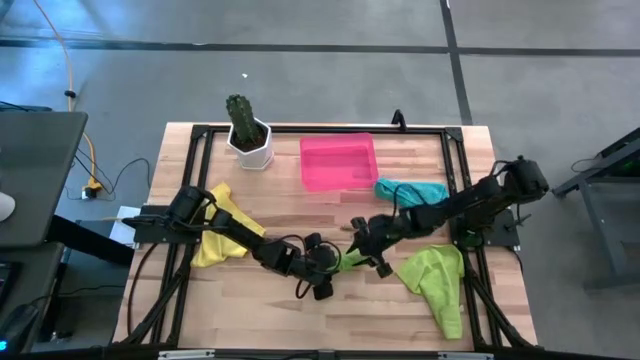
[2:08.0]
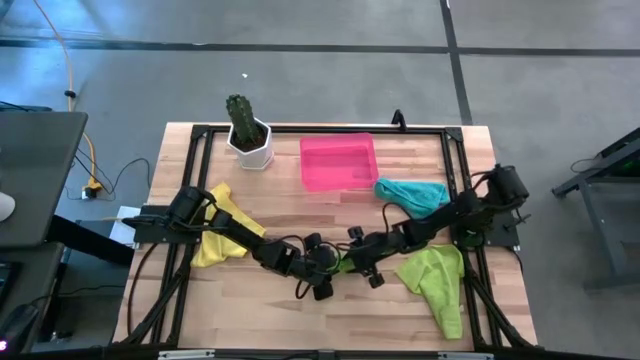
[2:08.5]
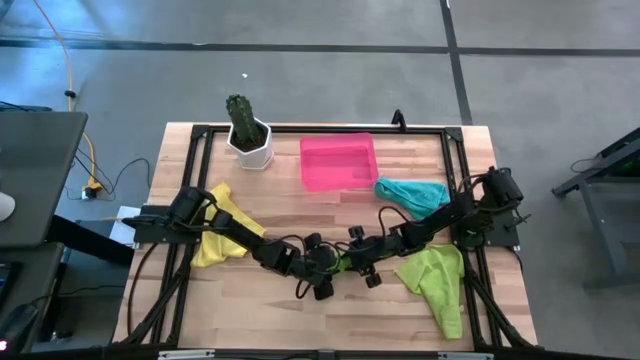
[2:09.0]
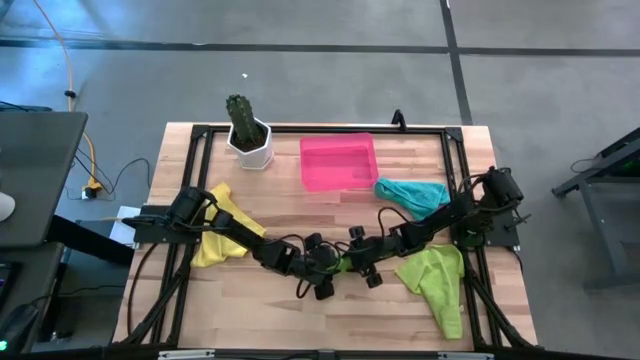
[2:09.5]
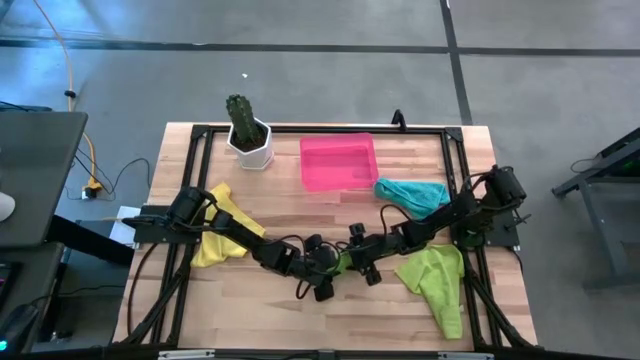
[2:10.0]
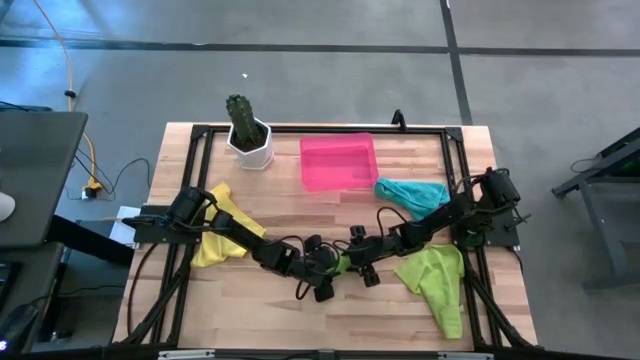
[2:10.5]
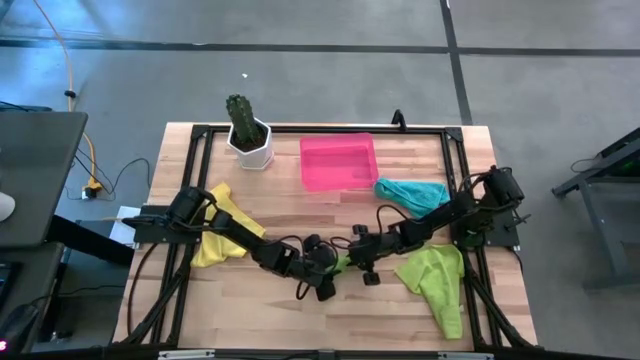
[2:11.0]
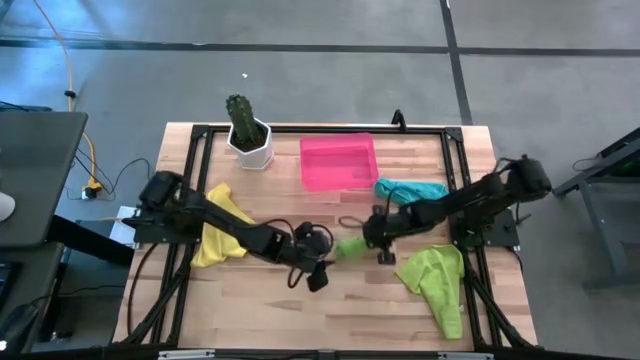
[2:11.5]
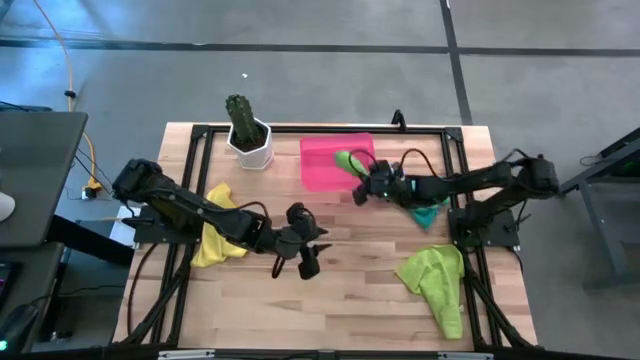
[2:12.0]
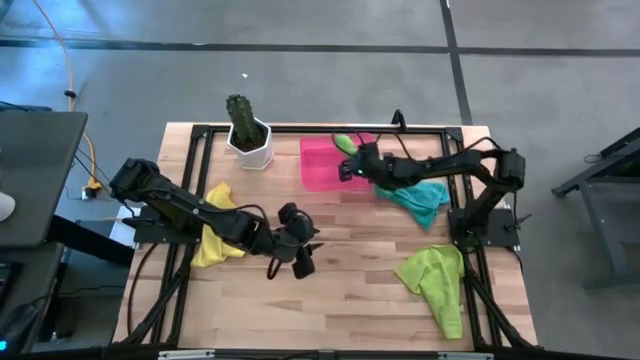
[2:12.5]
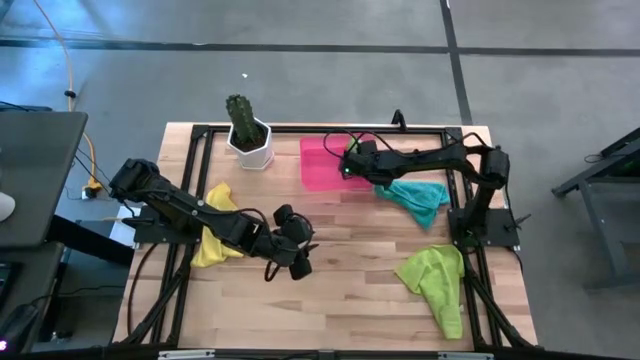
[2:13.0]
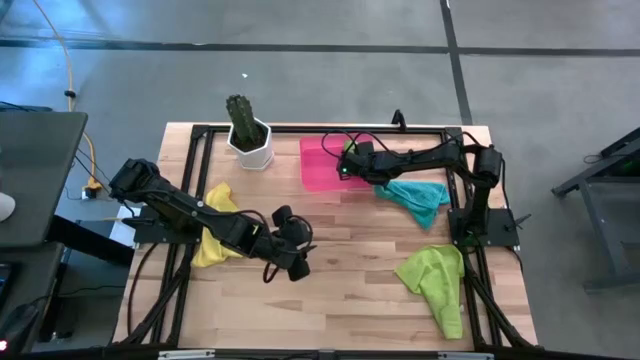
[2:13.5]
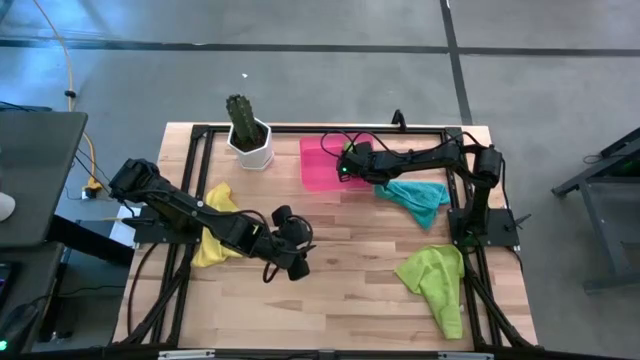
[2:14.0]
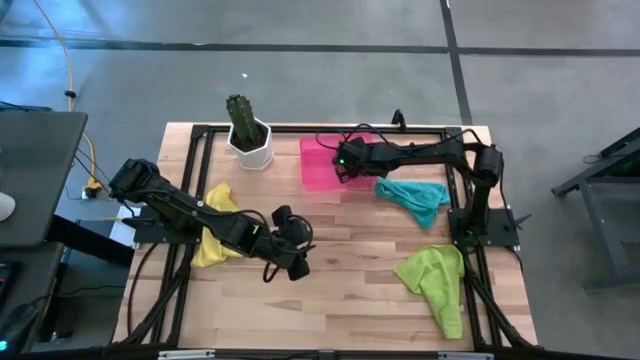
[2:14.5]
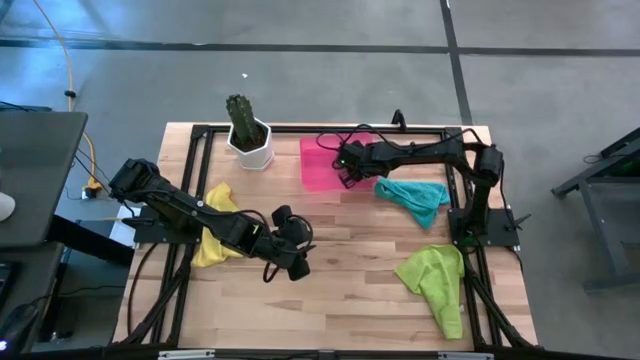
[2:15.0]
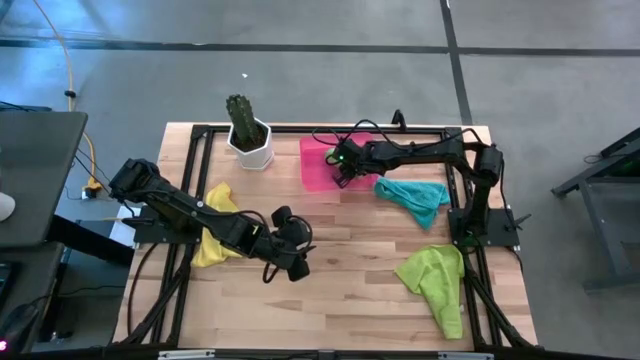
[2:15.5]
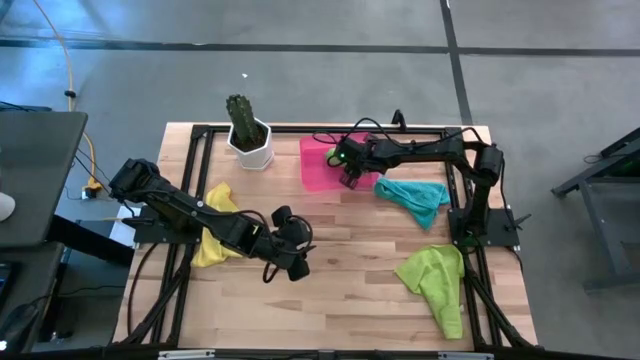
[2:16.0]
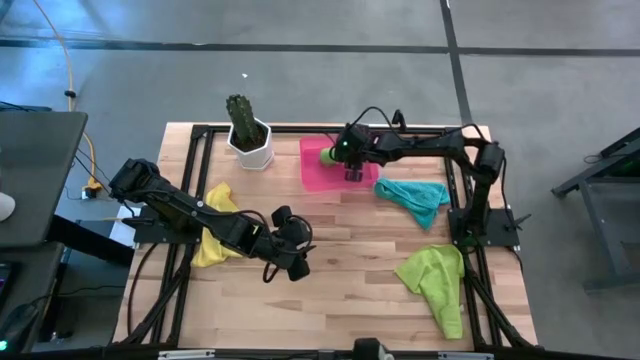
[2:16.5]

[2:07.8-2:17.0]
Task: Roll microfiber towels into tight, uniform cylinder then place into a basket
Put the rolled green microfiber cloth into the pink bin

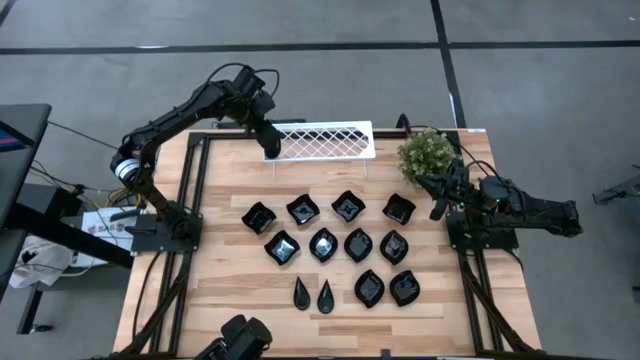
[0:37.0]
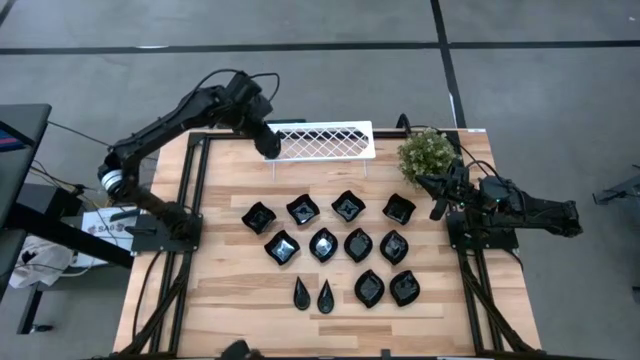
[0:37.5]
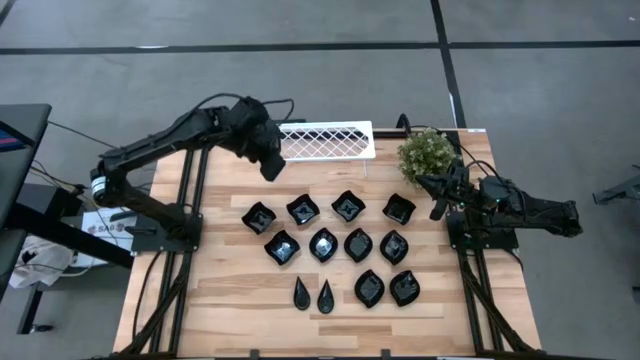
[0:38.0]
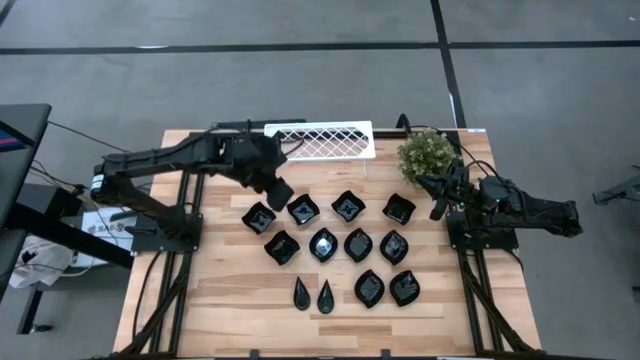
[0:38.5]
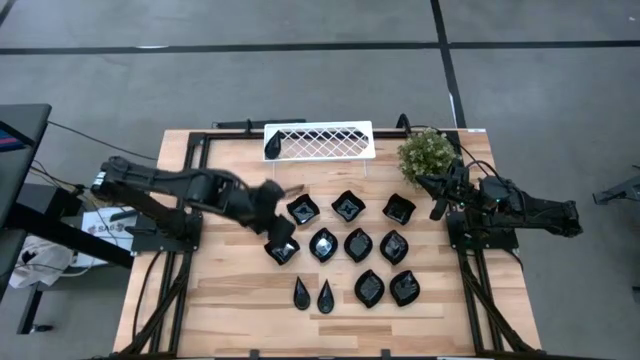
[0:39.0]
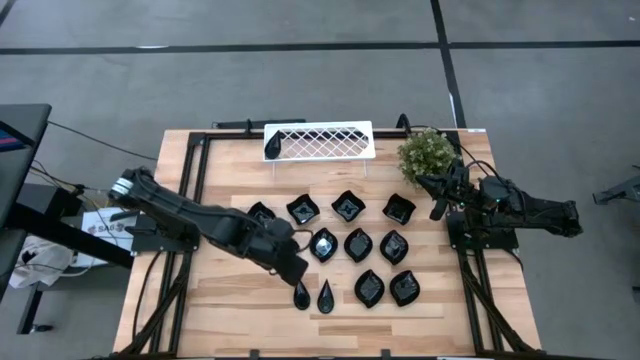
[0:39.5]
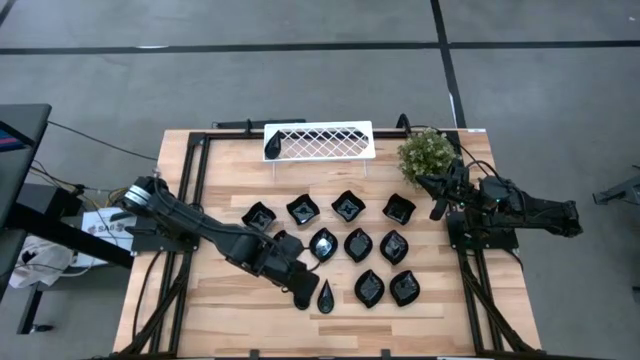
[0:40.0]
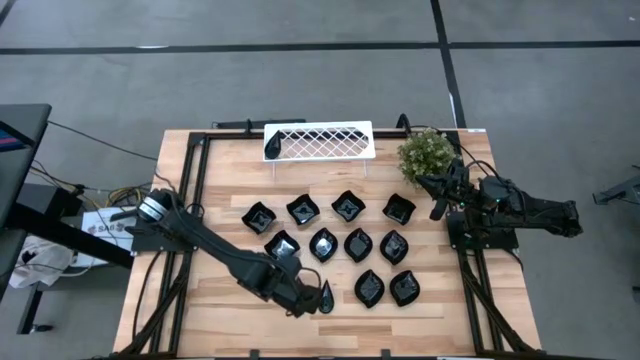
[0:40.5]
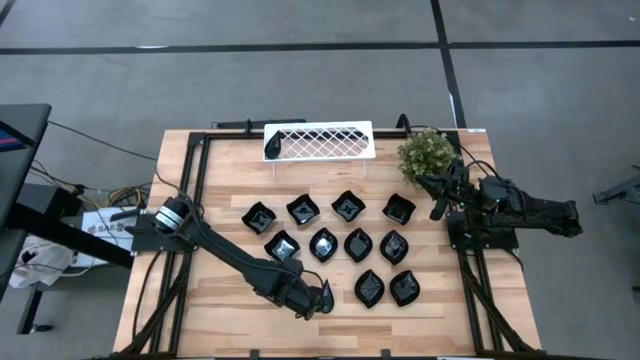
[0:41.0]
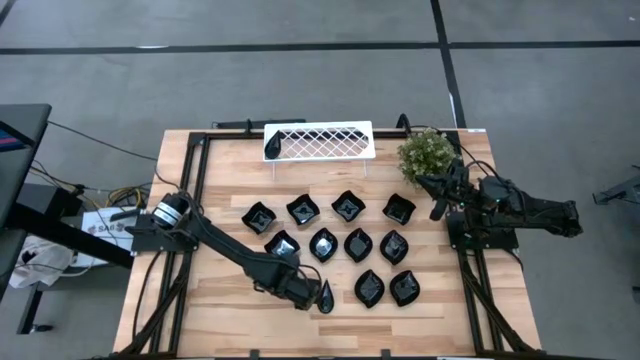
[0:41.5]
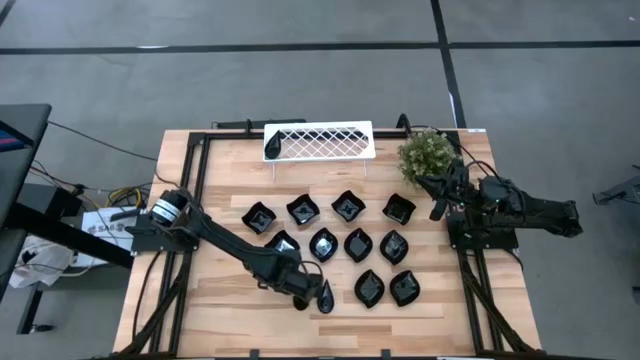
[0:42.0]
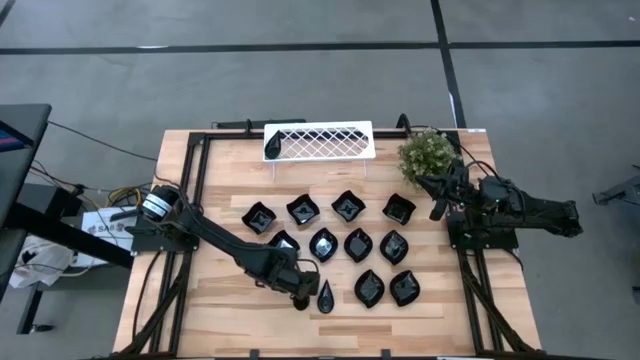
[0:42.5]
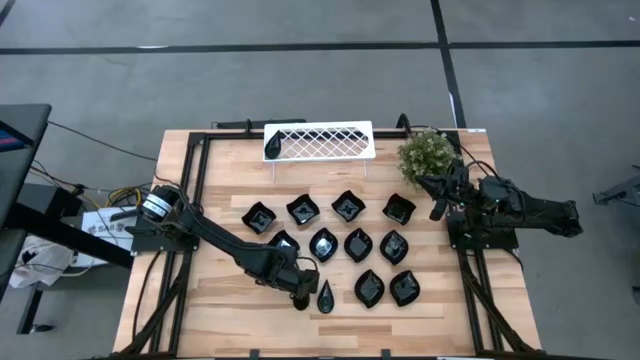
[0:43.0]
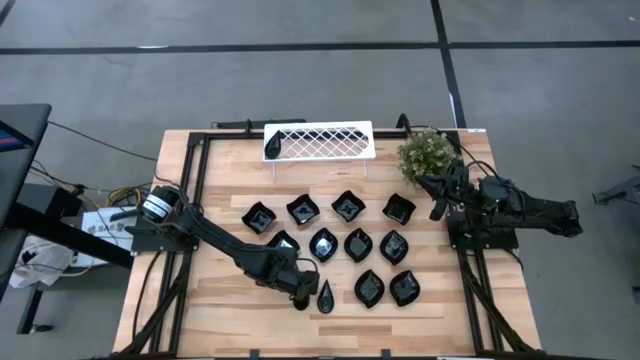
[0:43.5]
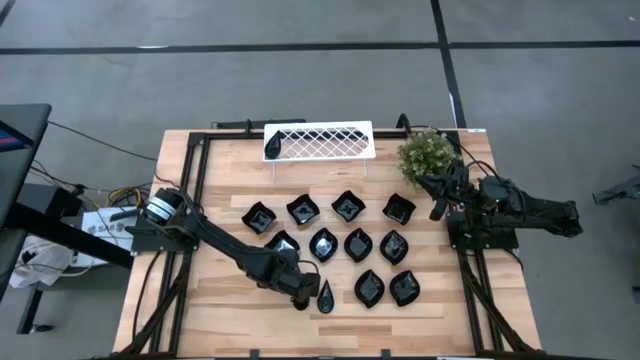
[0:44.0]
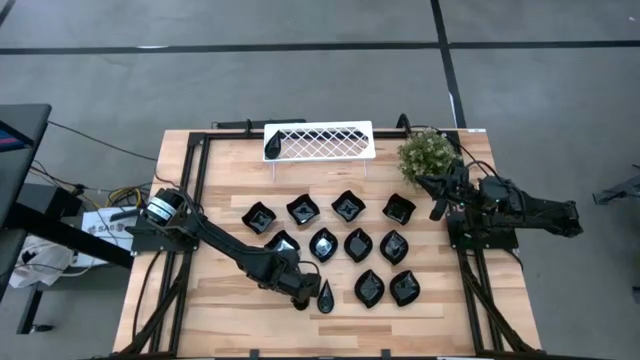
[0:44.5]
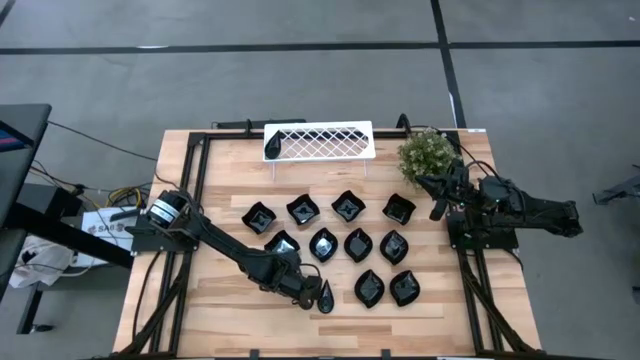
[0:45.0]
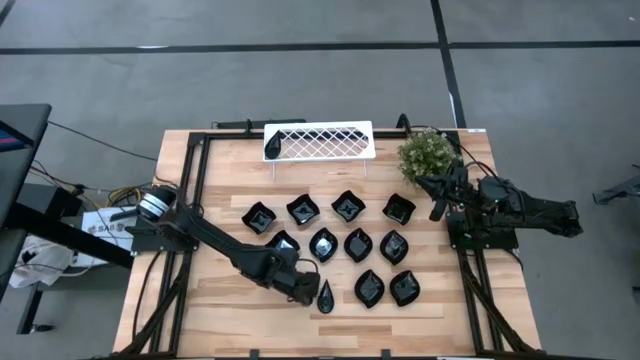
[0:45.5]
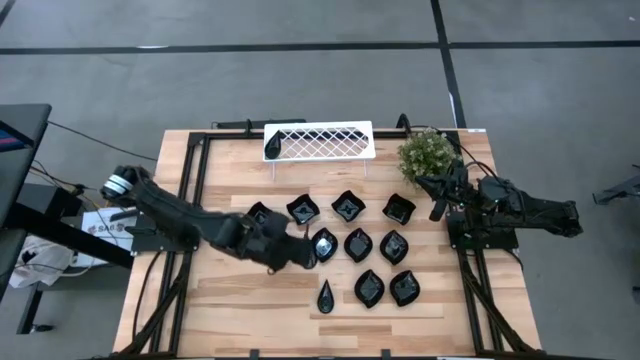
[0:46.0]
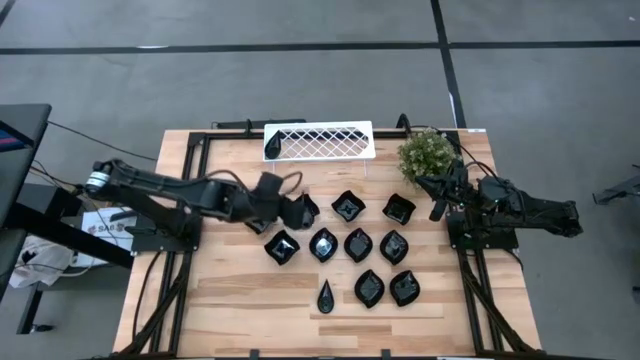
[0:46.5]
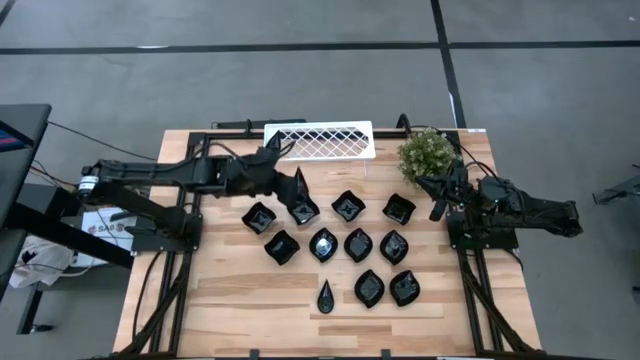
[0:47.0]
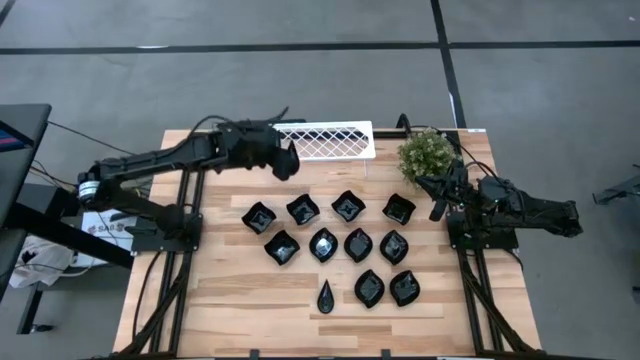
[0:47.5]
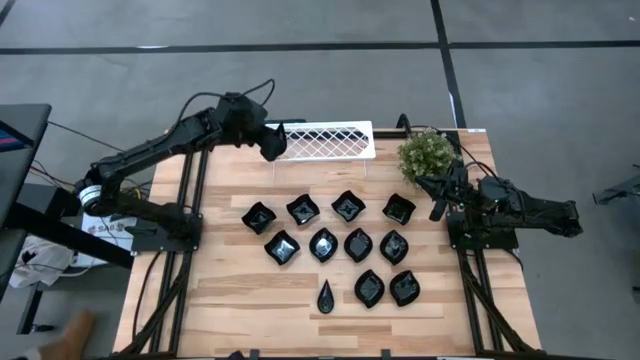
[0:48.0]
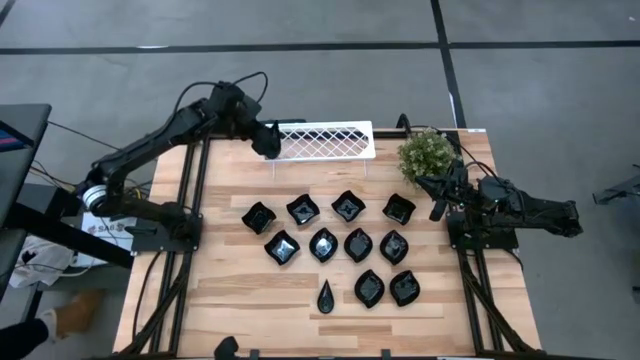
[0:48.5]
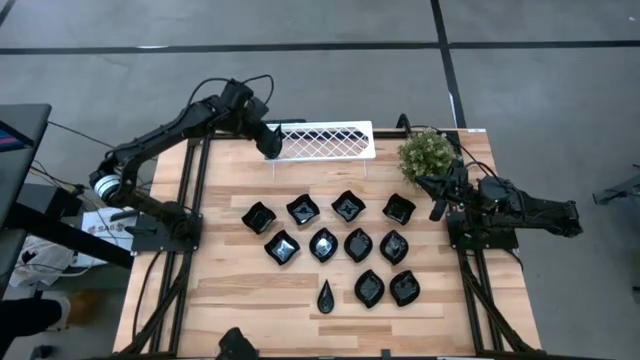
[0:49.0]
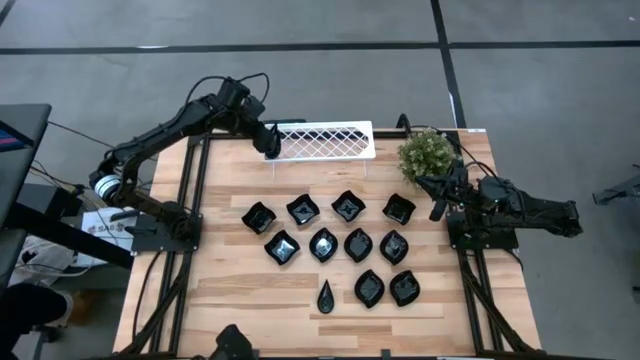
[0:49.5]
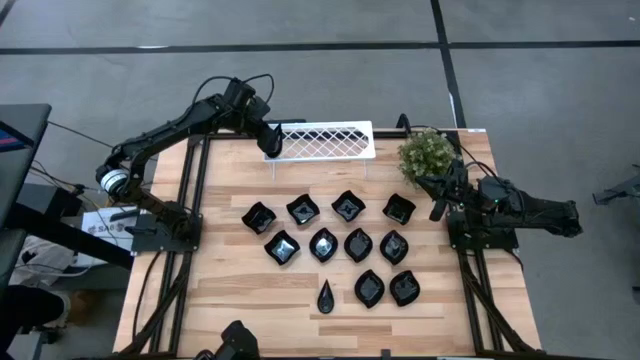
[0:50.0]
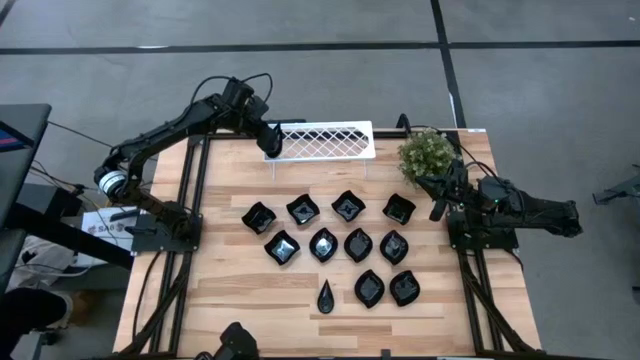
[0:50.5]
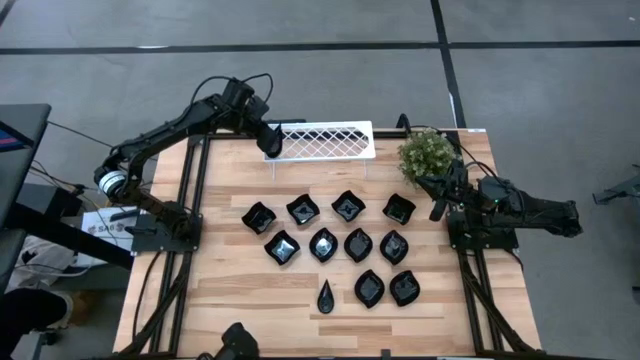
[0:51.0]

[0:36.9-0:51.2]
Task: Pick & Place Mini shaped plates
Stack the black drop-shaped plate on top of the black drop-shaped plates on the shelf
